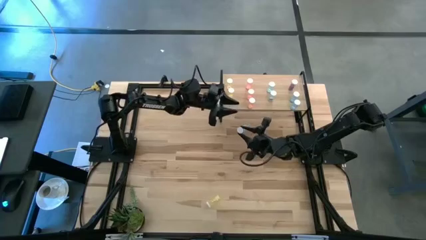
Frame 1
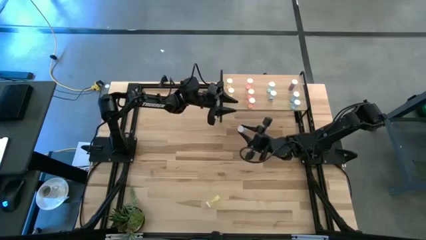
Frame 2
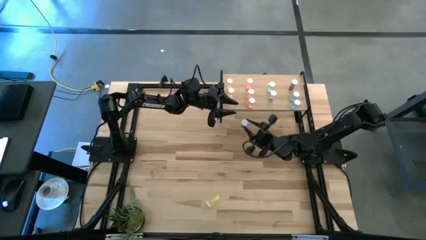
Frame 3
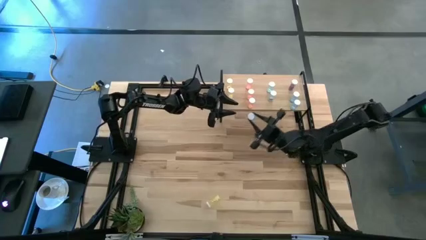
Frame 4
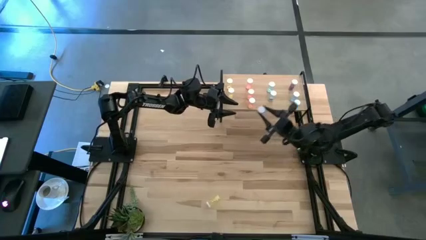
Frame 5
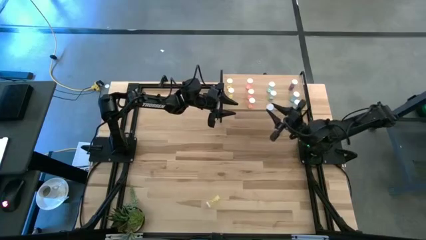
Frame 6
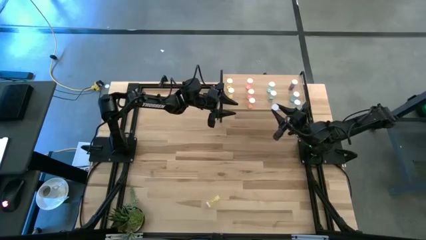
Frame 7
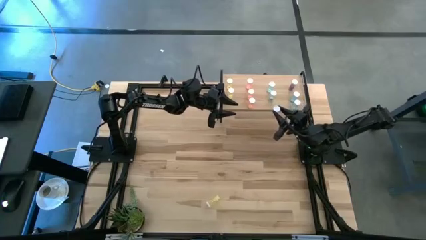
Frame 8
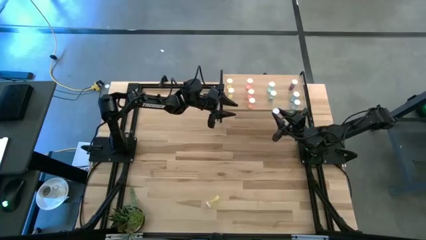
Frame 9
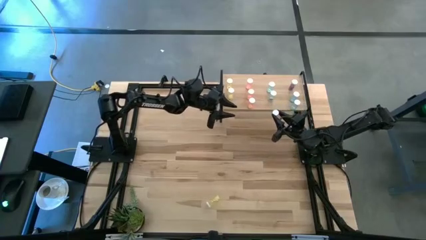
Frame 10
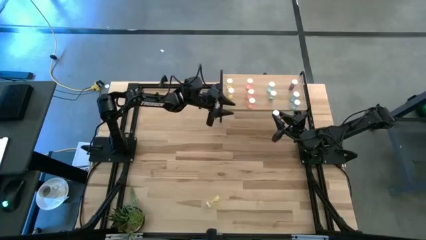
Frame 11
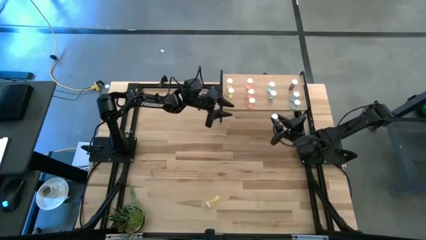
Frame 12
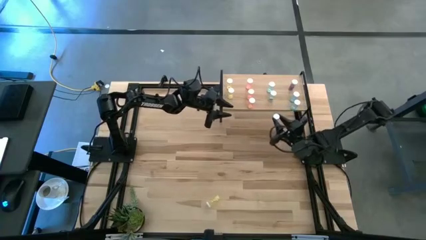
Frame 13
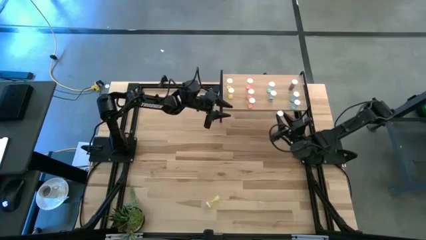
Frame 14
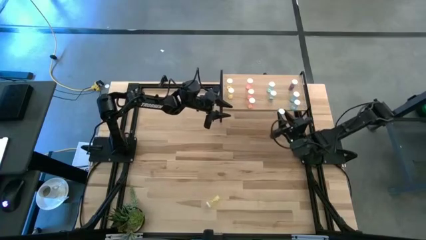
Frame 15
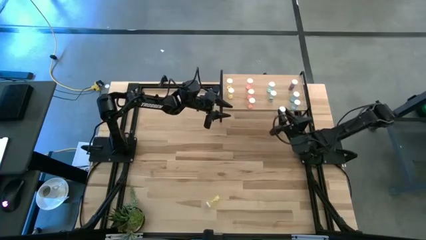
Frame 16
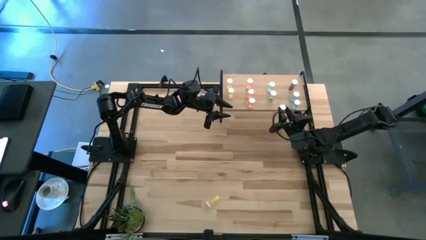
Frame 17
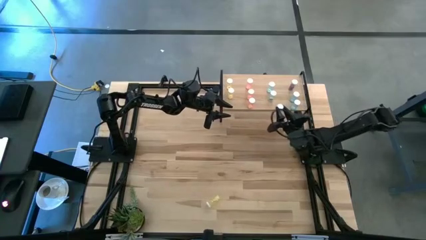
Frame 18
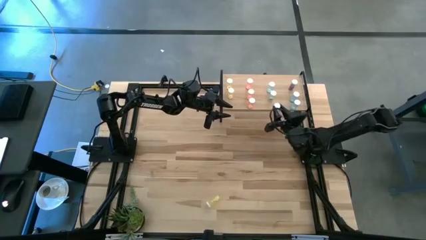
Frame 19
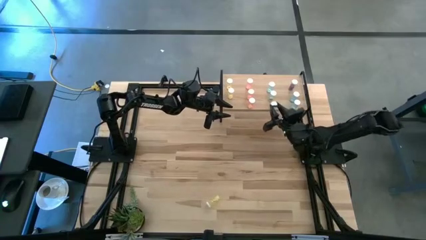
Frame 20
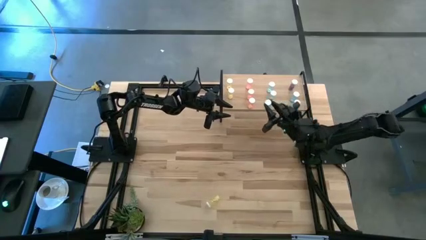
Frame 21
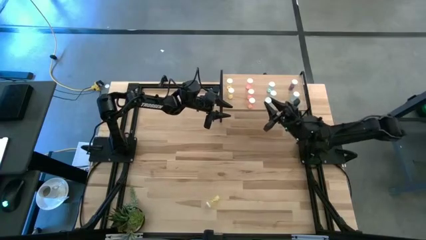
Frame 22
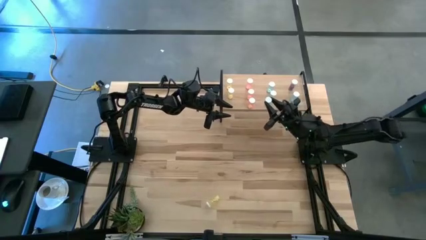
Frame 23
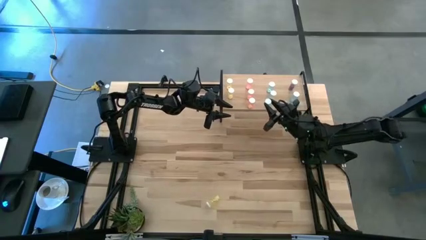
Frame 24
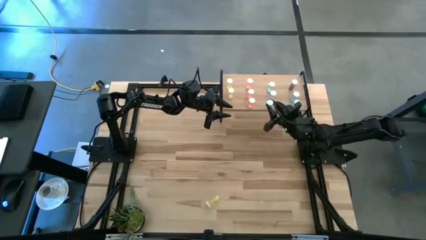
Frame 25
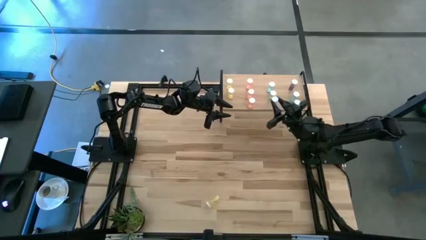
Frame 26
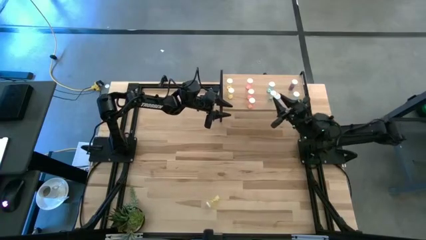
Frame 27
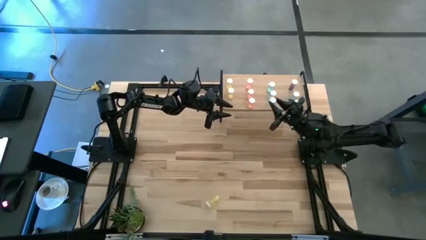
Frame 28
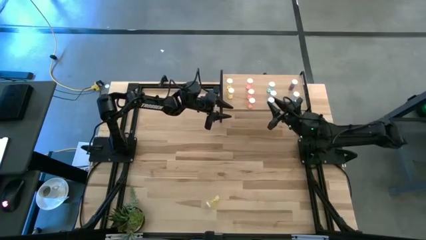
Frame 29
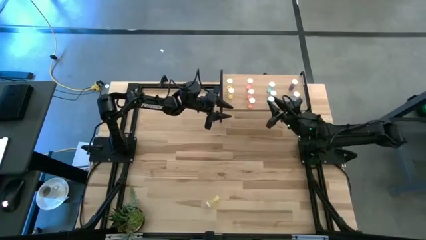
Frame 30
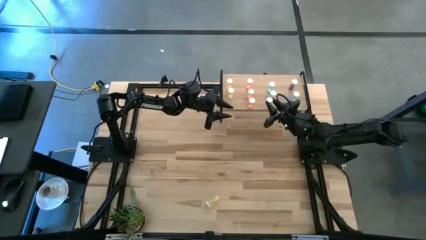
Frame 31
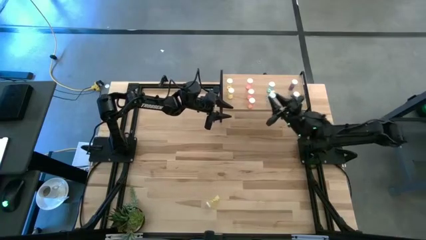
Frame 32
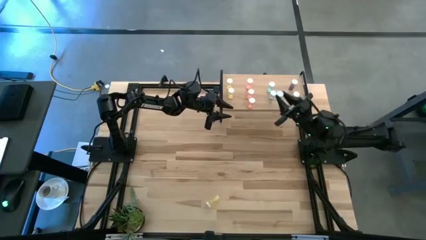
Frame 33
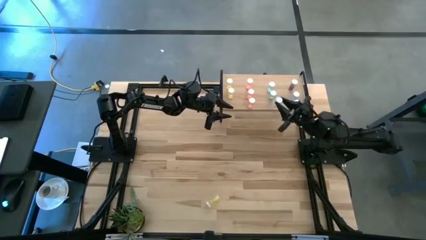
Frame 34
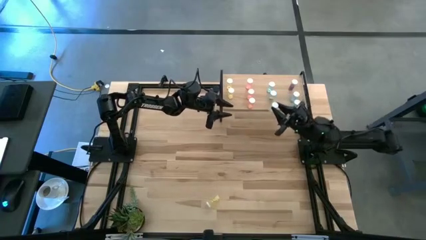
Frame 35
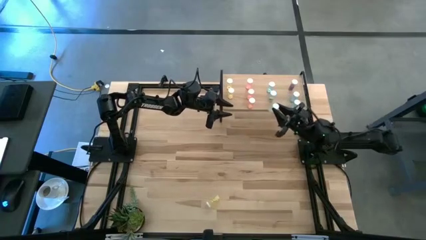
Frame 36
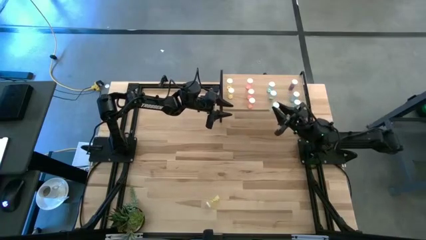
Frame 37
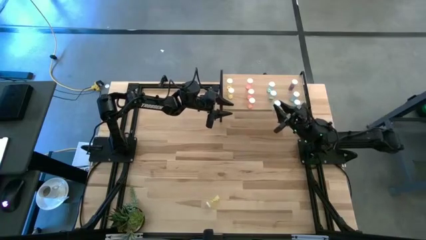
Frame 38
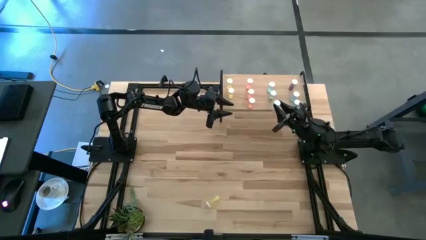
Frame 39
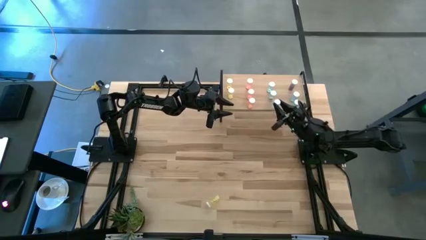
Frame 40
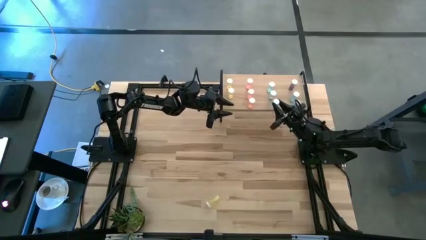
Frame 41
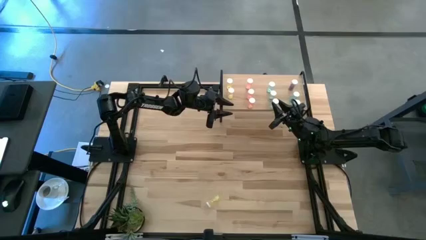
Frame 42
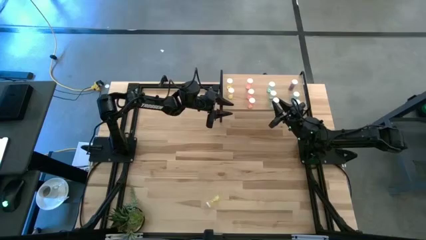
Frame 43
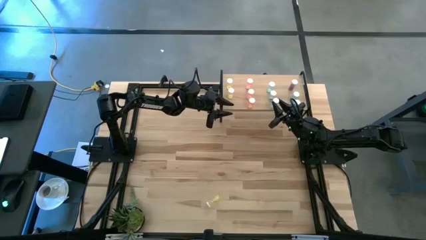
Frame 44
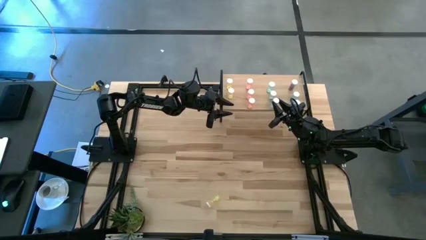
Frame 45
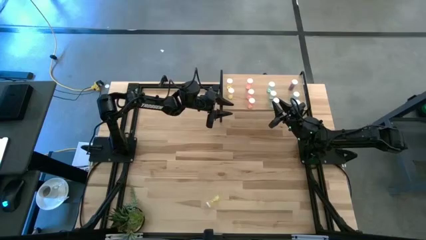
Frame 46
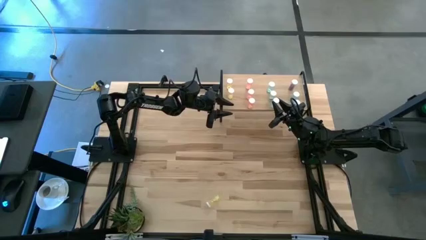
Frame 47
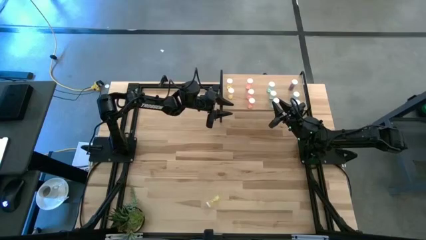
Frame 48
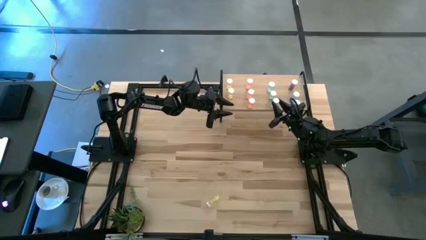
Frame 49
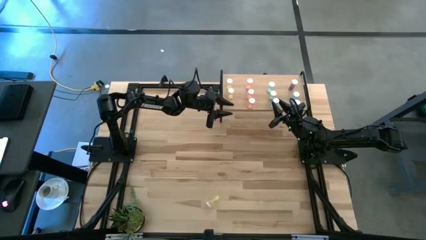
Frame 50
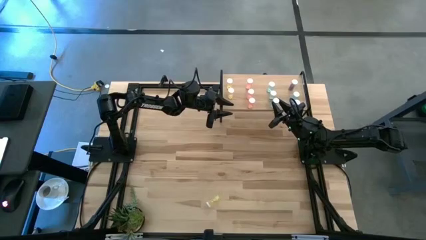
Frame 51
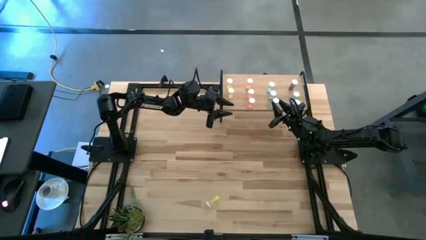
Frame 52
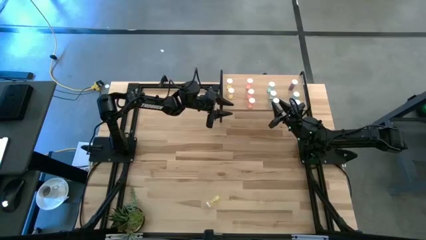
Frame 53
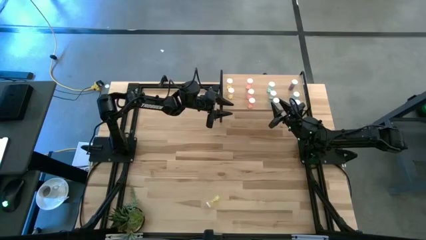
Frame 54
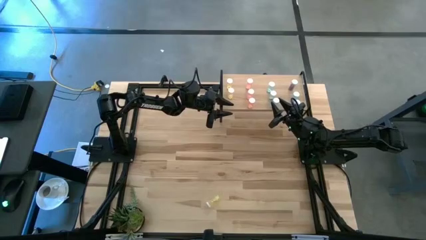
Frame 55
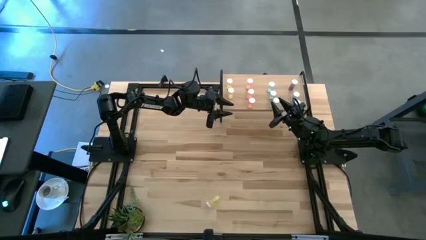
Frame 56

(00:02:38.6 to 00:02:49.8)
Task: Pick and place medicine bottles onto shelf by color
Put the green pill bottle on the shelf aligned with the other green pill bottle

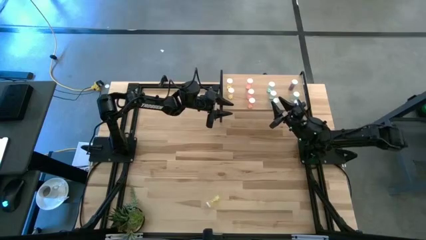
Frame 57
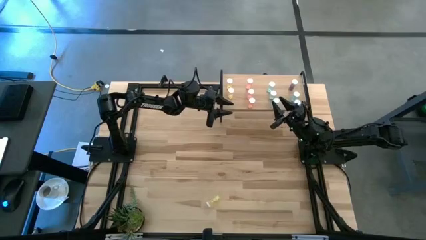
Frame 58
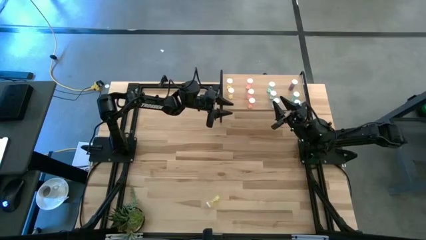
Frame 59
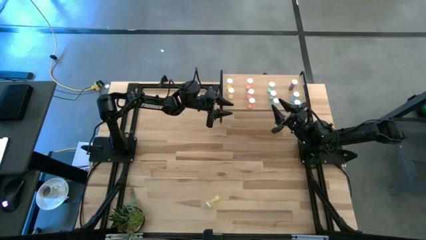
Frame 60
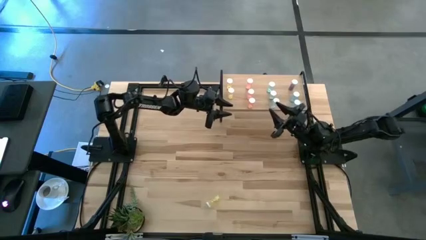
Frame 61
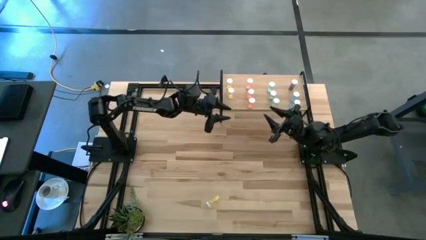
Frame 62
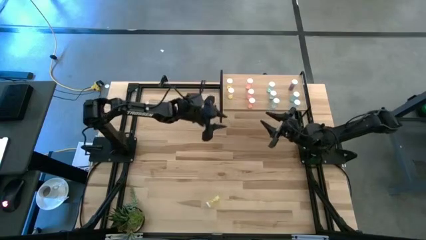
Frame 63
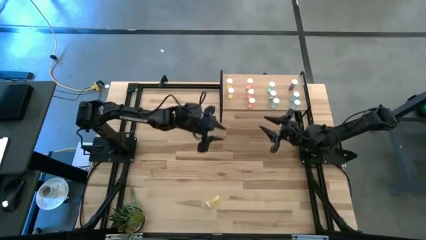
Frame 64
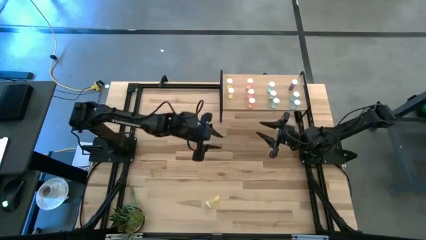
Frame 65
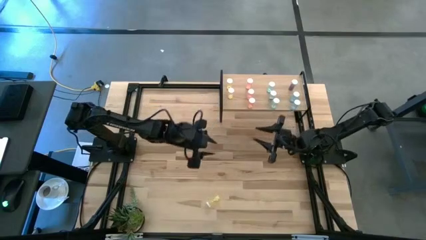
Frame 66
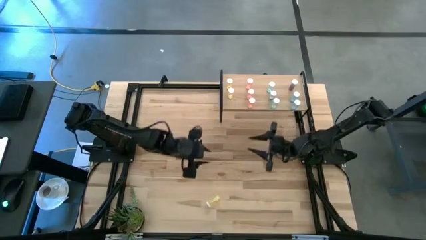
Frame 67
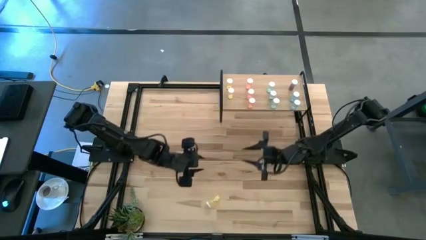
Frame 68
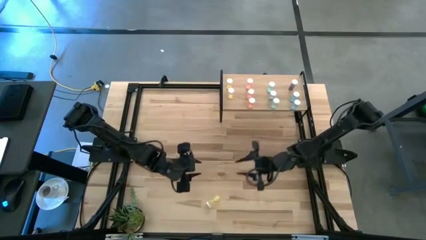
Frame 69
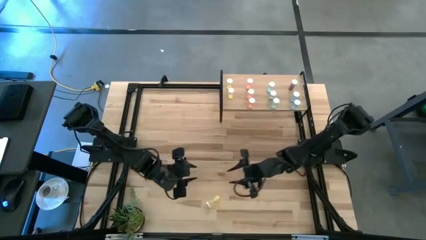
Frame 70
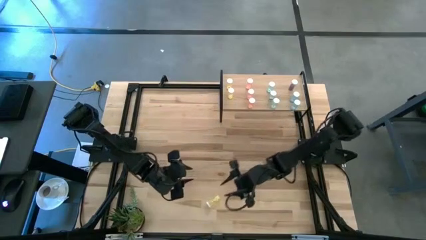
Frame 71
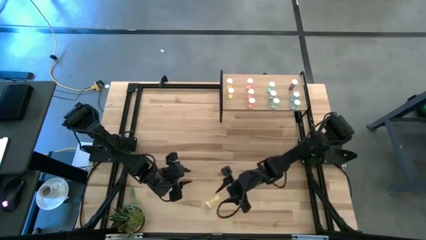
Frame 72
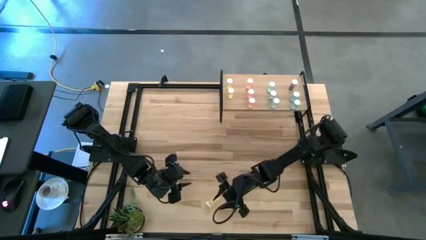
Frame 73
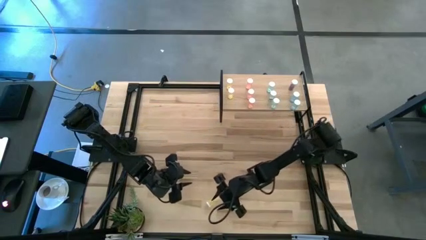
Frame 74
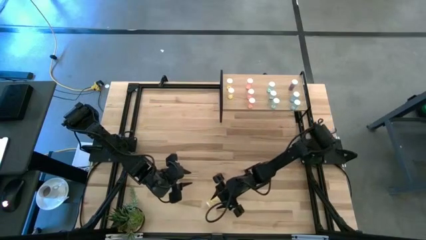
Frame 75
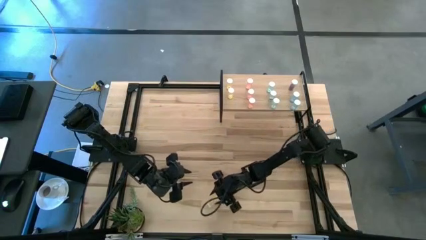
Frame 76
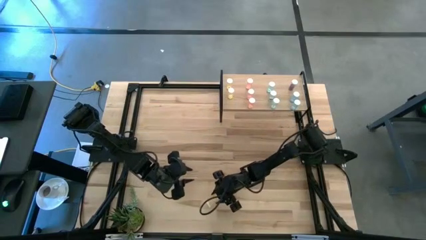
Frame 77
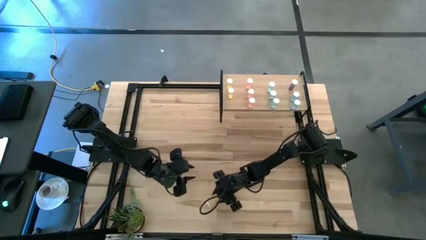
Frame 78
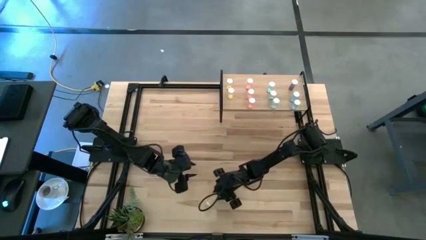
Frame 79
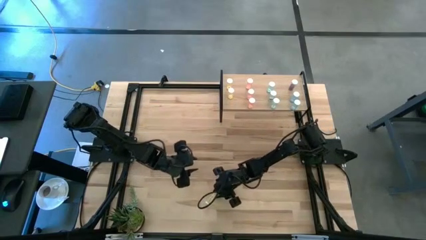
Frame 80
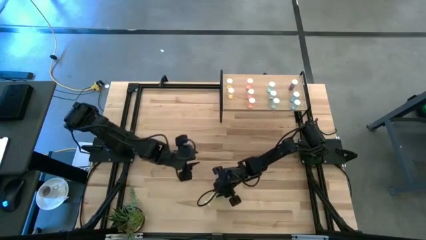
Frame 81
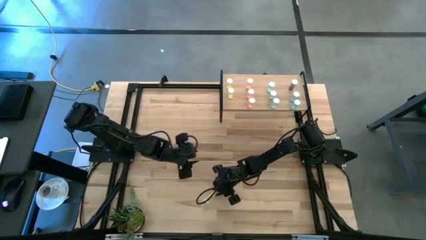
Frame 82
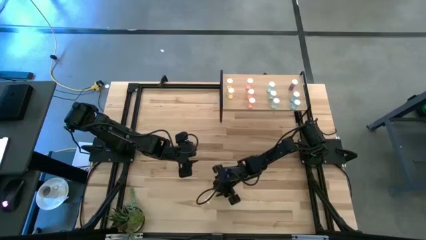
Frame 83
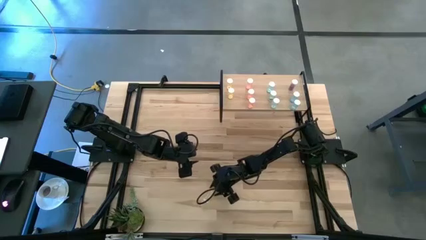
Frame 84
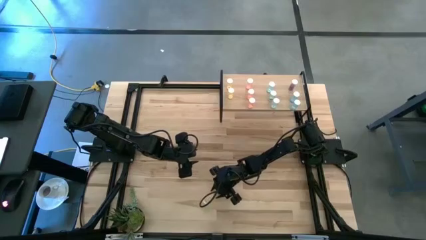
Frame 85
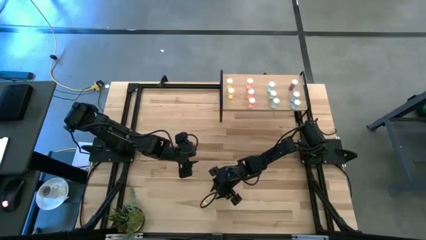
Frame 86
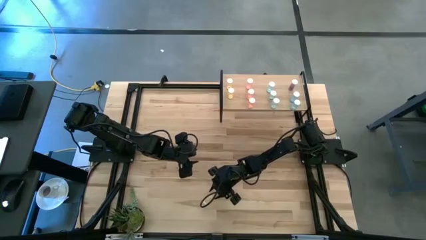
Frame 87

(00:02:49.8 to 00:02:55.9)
Put the yellow pill bottle on the shelf aligned with the other yellow pill bottle
